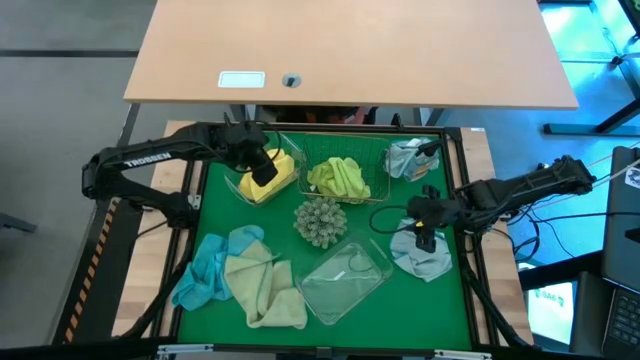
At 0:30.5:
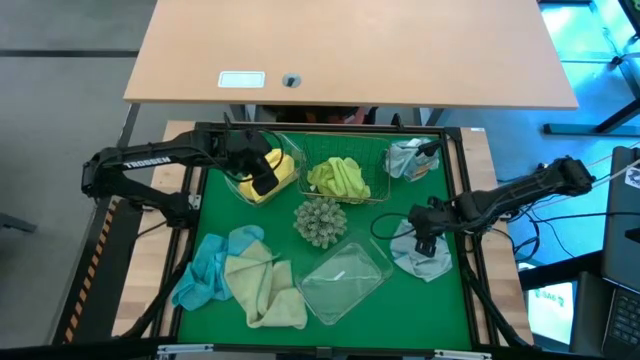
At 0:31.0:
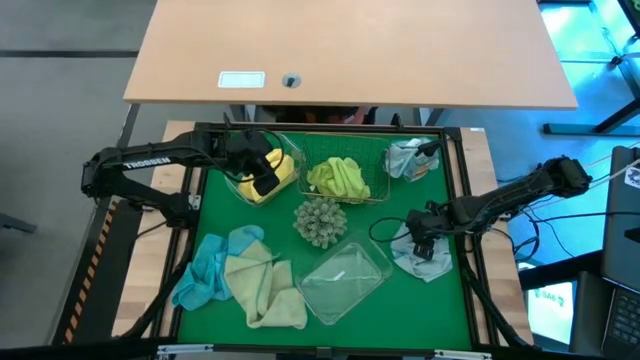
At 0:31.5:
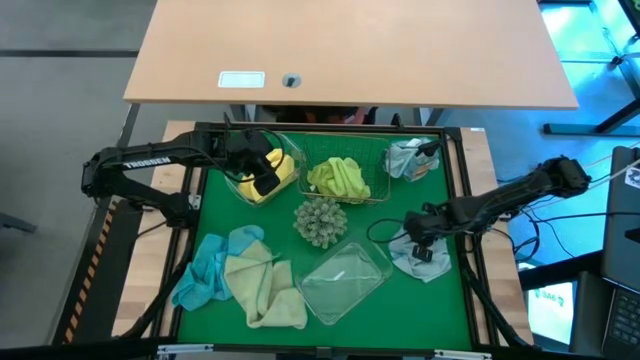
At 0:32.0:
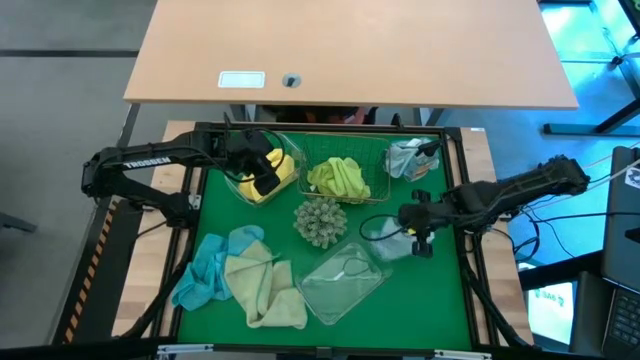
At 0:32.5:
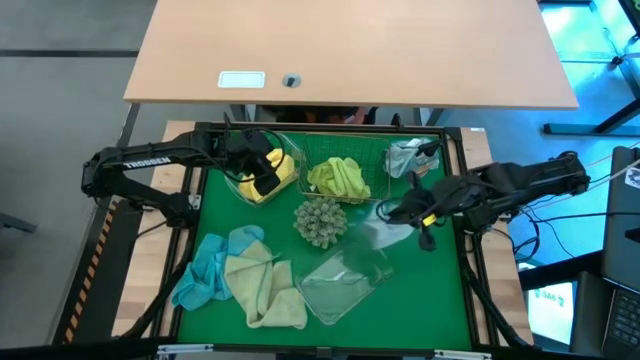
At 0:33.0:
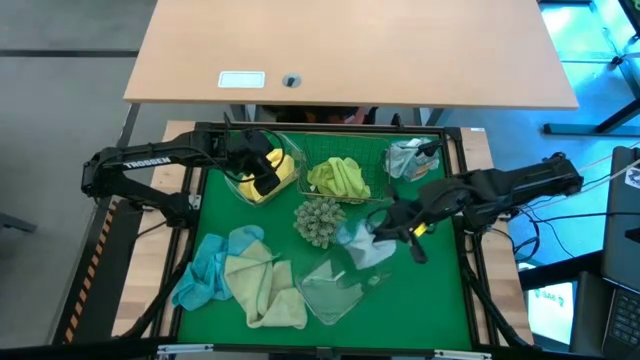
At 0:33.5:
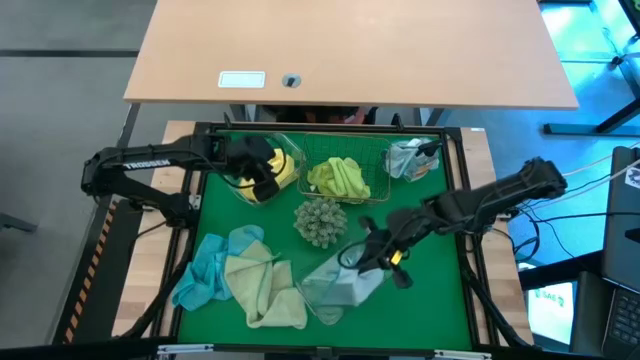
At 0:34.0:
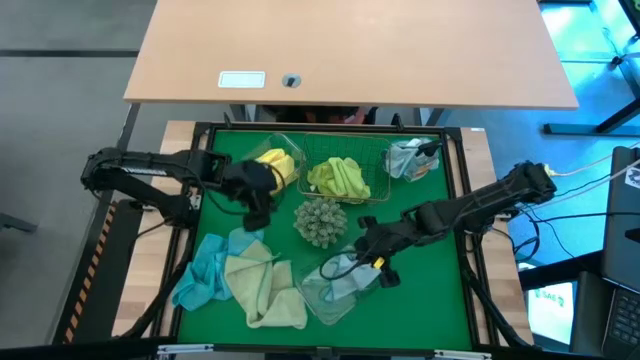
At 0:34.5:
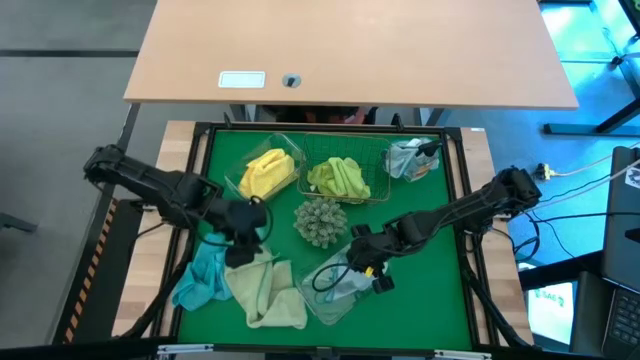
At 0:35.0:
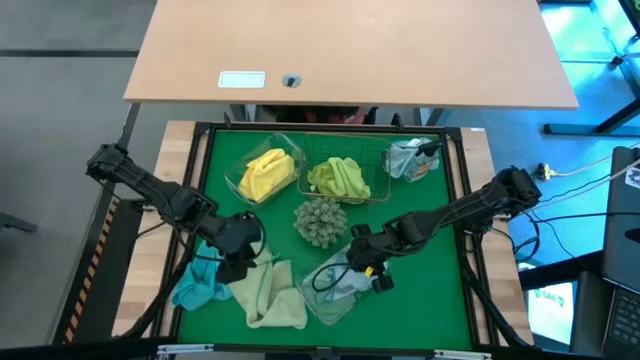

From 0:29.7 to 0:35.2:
Task: Sort microfiber towel by color & place in baskets
Put the bottom light blue microfiber towel into the bottom transparent bin

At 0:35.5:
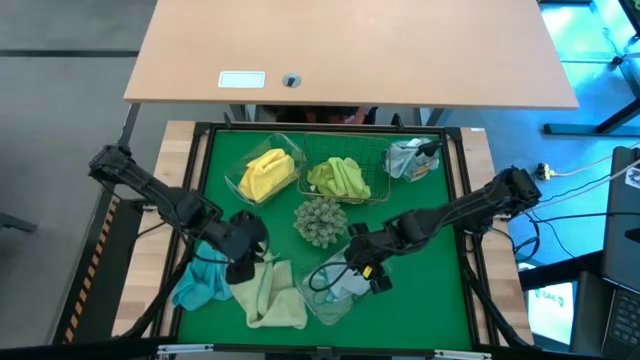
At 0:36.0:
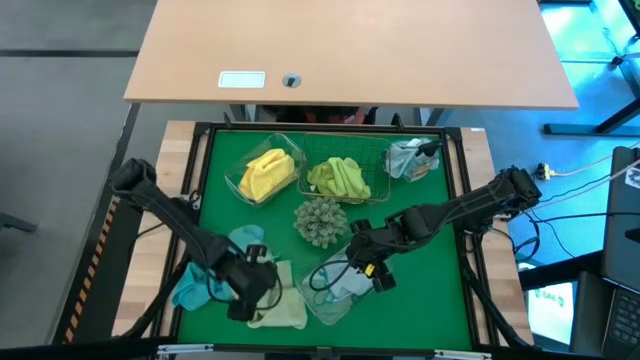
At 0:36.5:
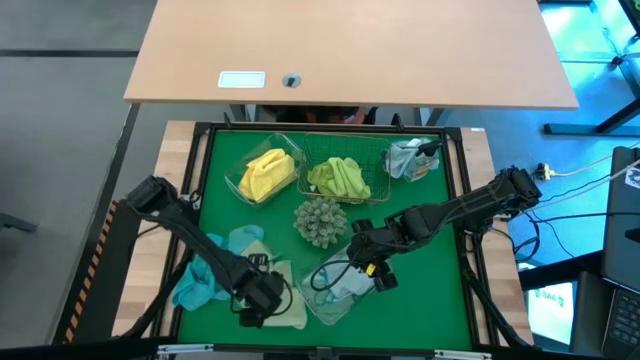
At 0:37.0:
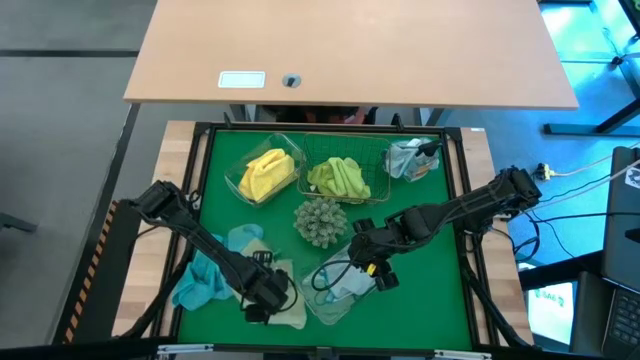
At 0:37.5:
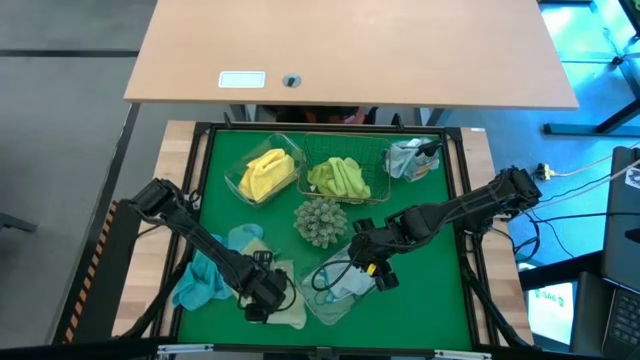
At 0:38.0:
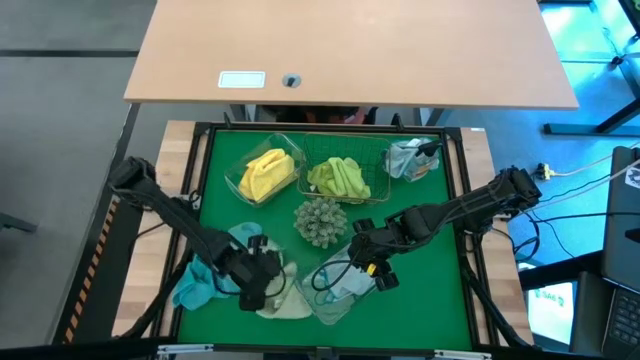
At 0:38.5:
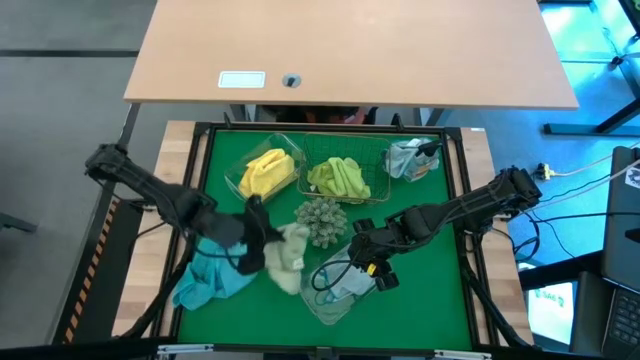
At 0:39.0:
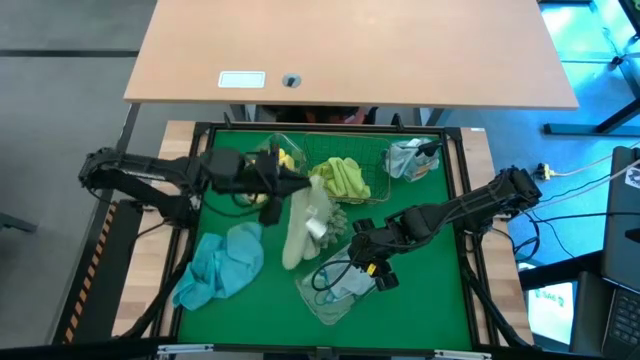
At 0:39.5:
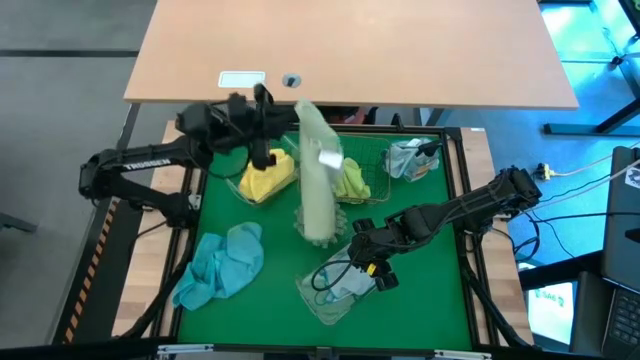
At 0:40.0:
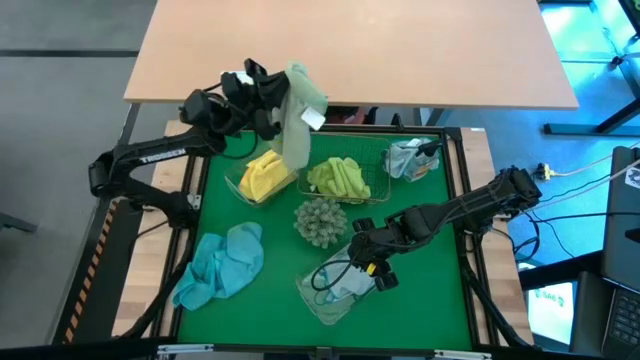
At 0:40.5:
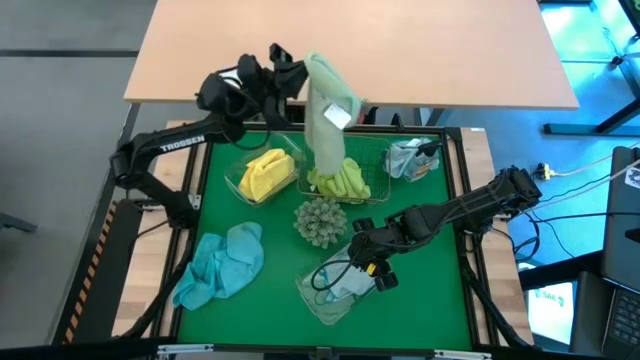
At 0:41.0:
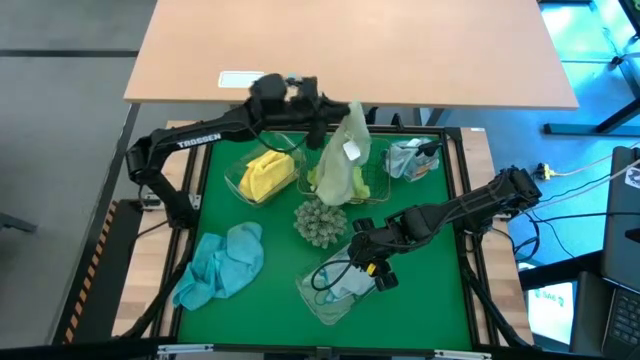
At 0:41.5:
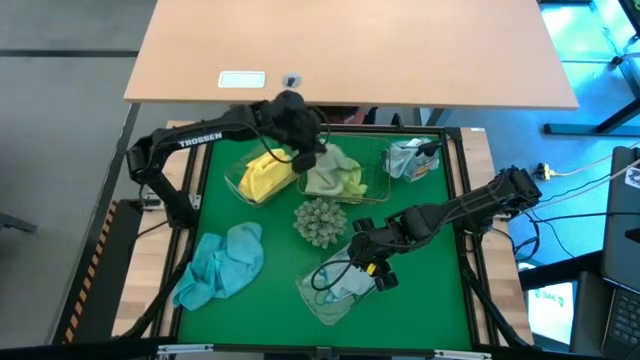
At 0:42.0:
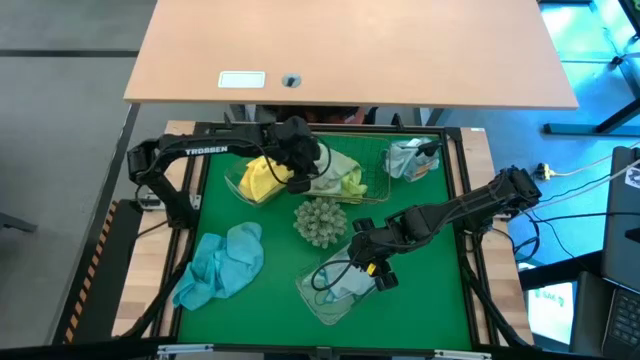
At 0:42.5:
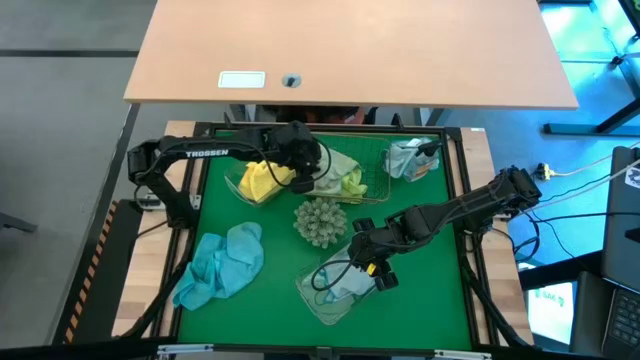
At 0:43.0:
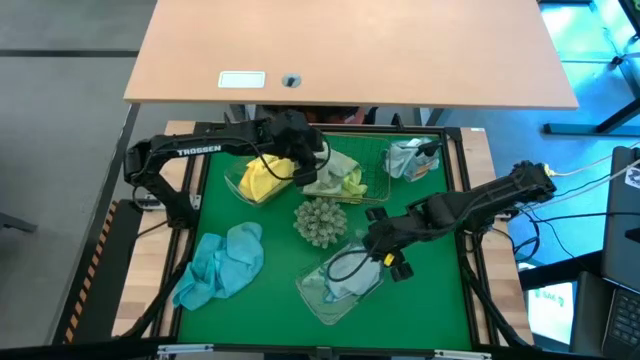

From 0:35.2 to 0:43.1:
Put the green microfiber towel into the wire basket

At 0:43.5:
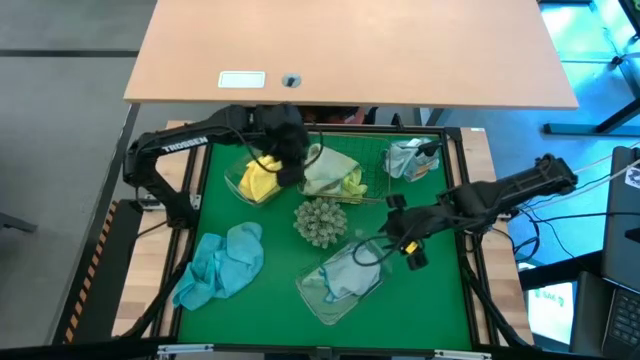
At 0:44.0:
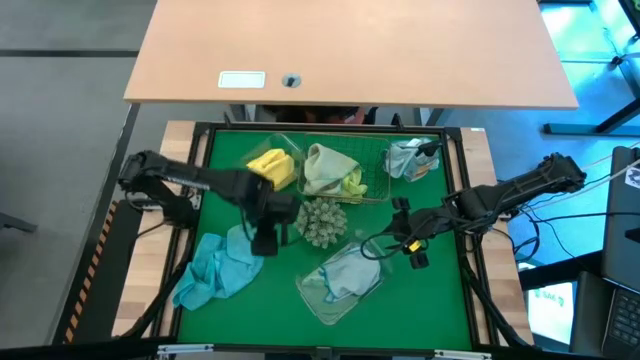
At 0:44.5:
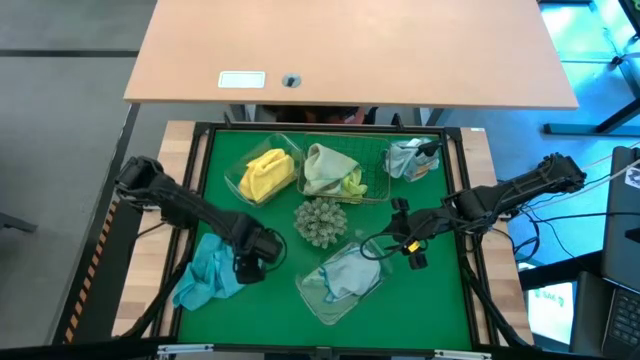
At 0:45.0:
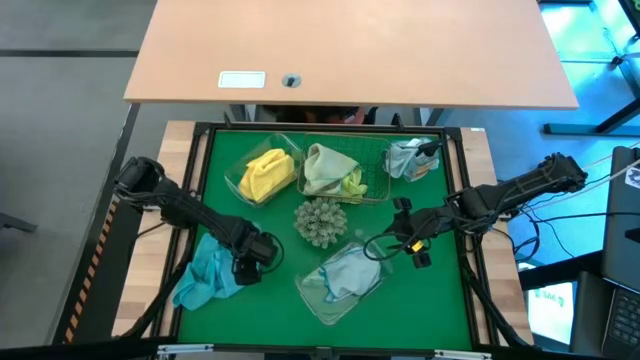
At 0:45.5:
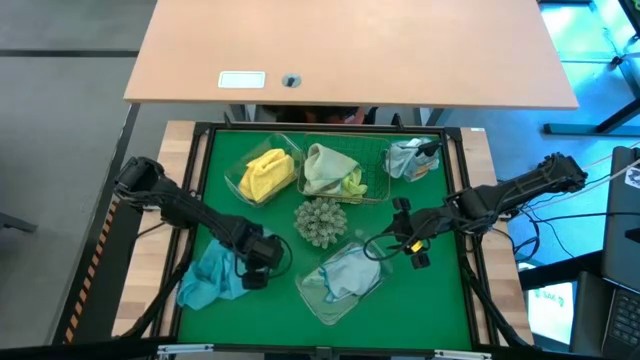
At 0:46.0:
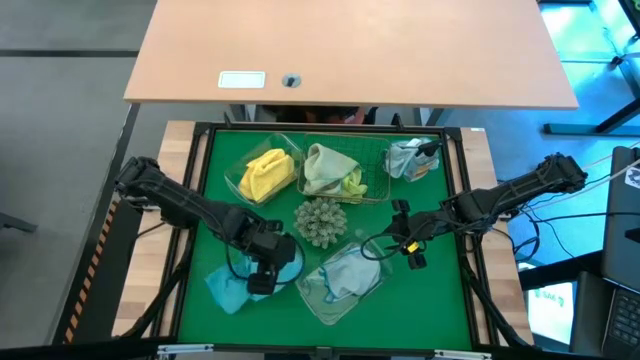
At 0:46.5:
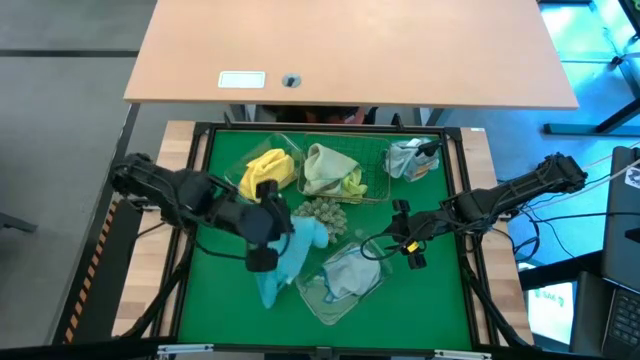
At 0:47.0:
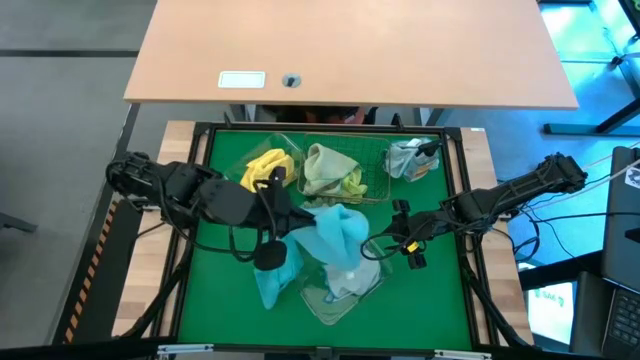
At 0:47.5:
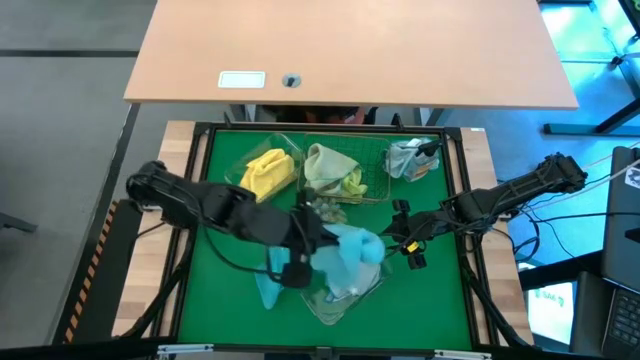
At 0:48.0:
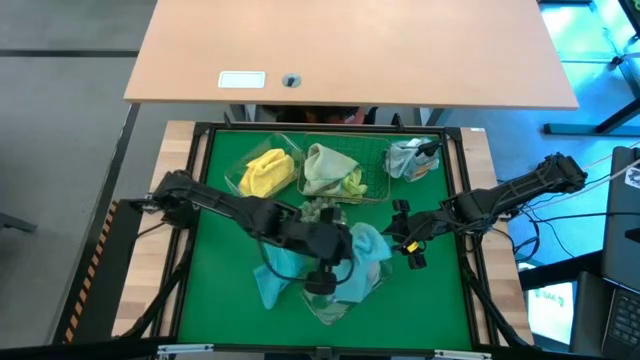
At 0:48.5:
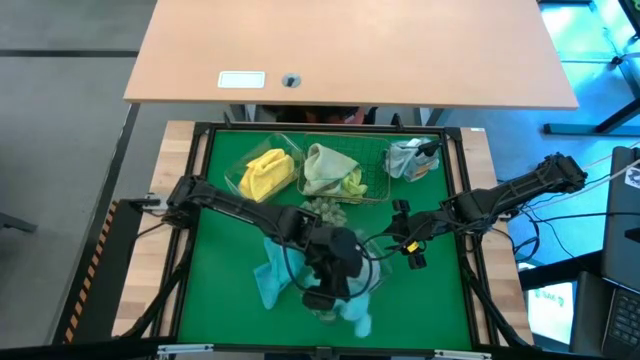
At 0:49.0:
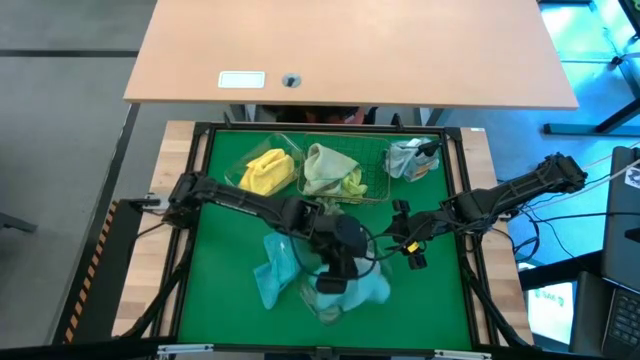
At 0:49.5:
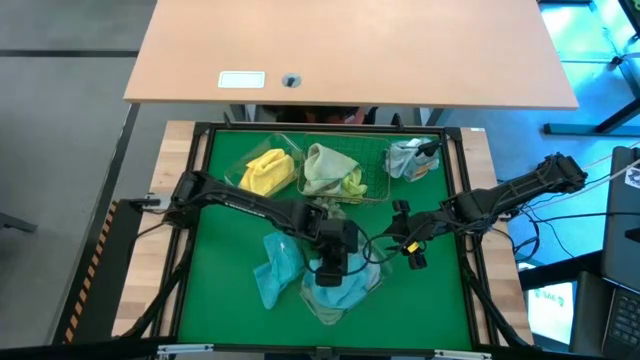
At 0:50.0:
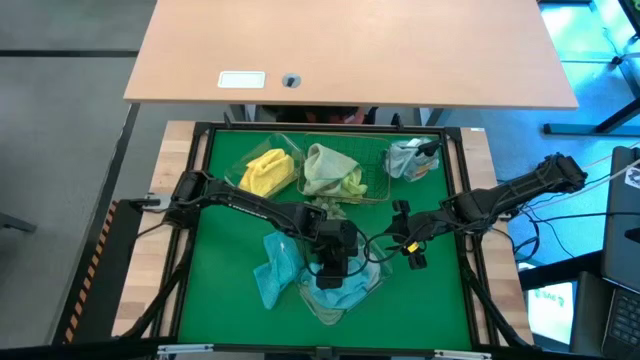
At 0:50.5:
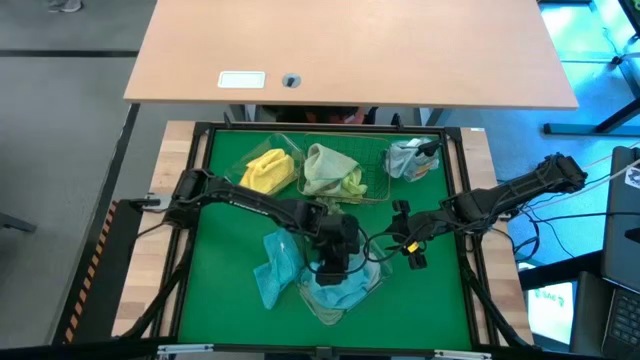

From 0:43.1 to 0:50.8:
Put the right blue microfiber towel into the bottom transparent bin

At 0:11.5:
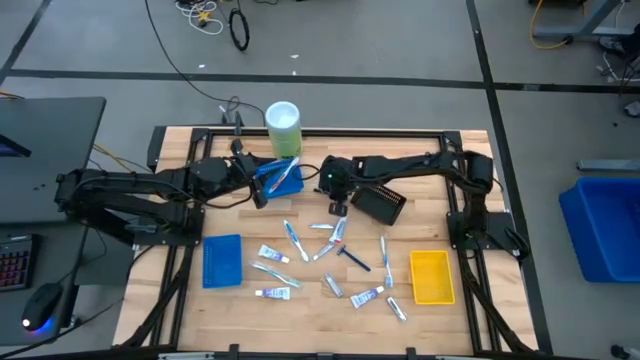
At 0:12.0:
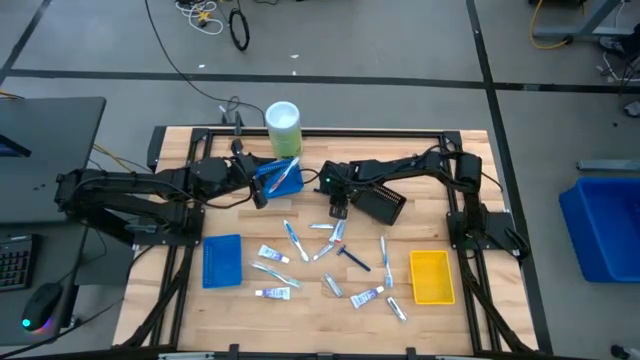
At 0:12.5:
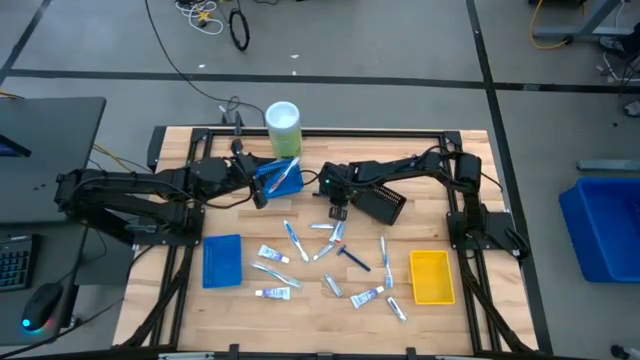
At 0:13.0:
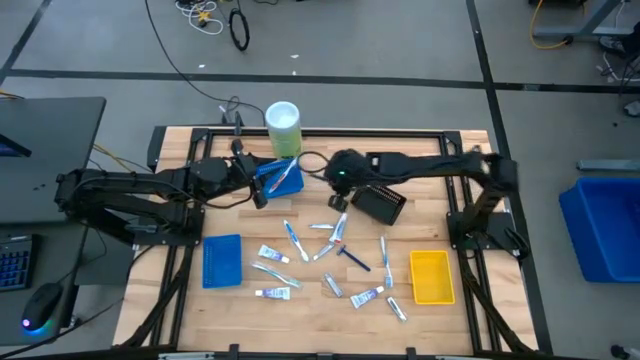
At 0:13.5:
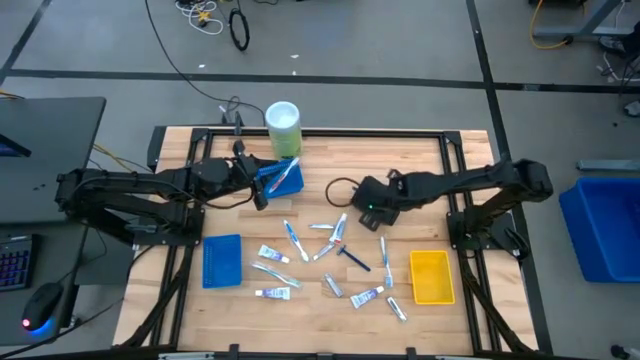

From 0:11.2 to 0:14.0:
Task: Pick & Place Travel size toiletries
Put the blue razor into the black bin
